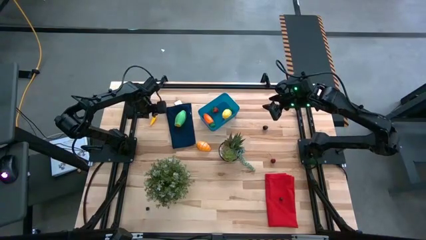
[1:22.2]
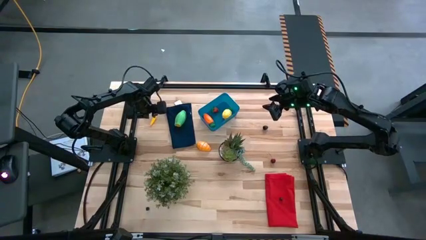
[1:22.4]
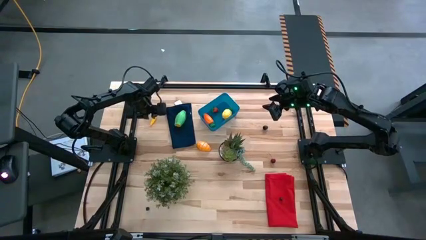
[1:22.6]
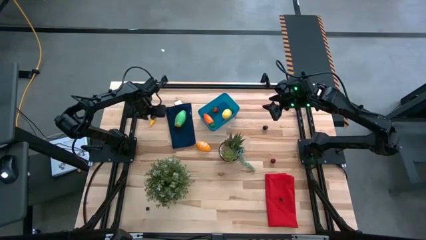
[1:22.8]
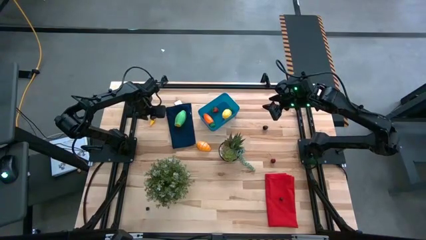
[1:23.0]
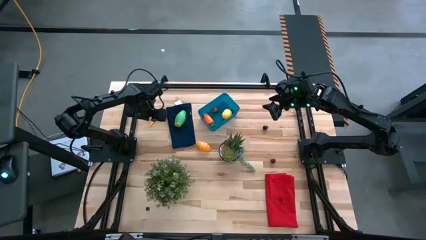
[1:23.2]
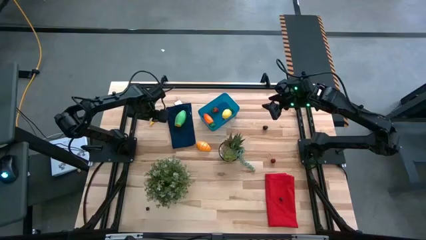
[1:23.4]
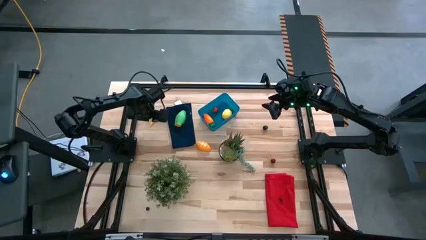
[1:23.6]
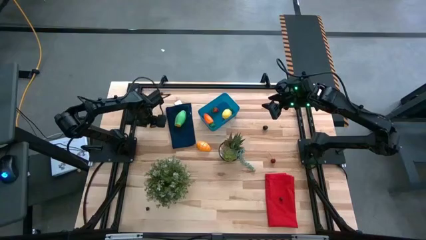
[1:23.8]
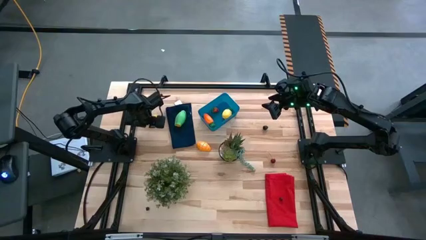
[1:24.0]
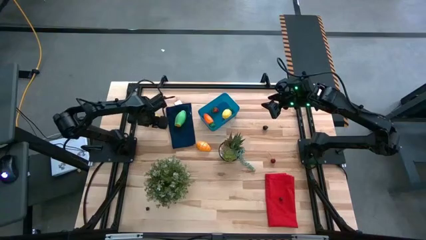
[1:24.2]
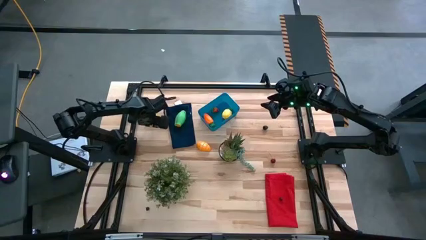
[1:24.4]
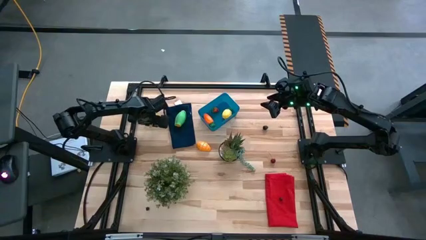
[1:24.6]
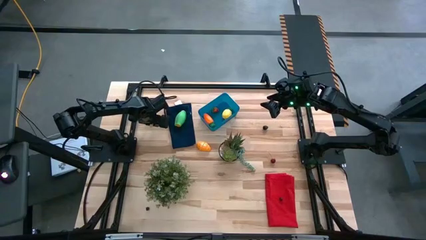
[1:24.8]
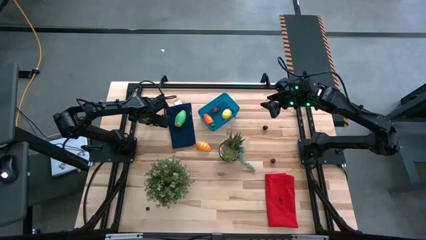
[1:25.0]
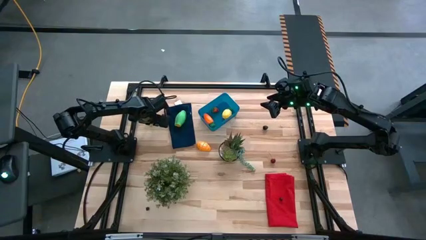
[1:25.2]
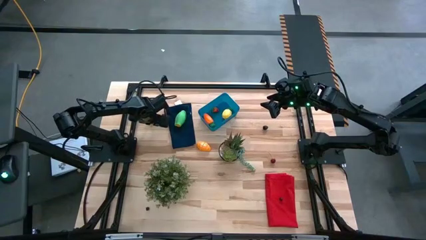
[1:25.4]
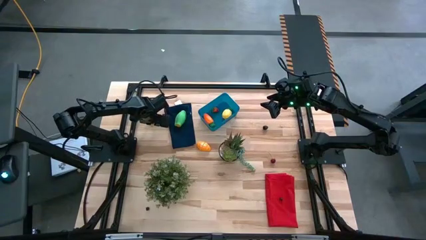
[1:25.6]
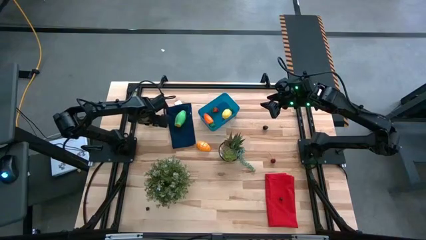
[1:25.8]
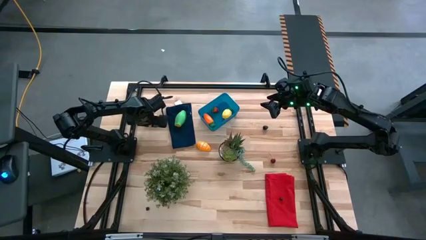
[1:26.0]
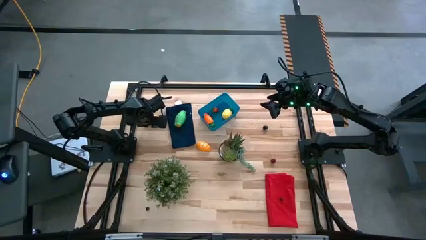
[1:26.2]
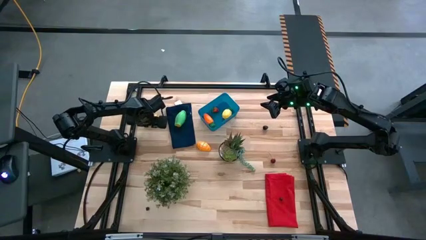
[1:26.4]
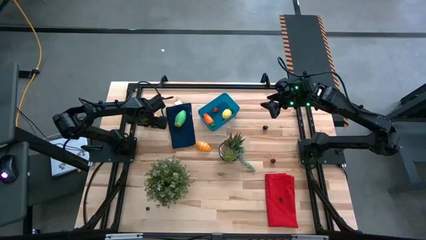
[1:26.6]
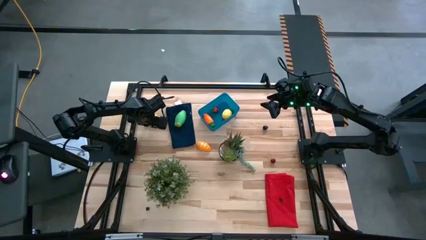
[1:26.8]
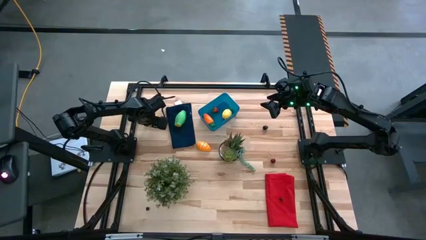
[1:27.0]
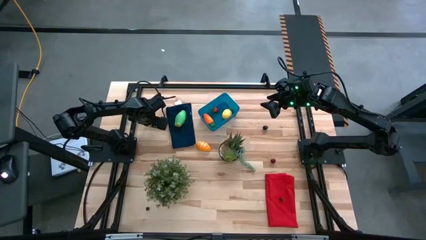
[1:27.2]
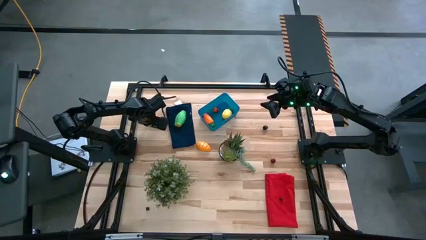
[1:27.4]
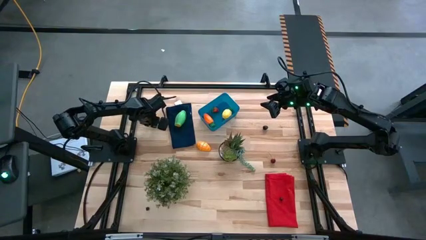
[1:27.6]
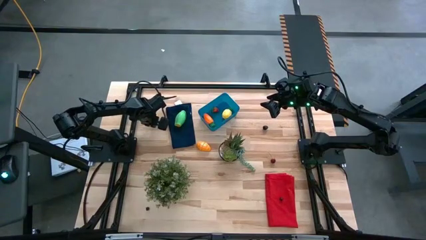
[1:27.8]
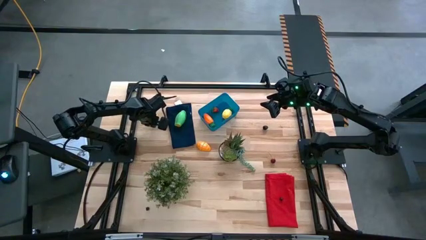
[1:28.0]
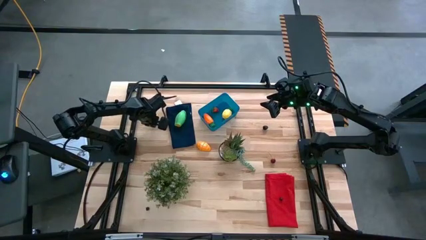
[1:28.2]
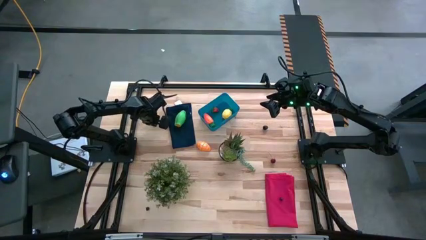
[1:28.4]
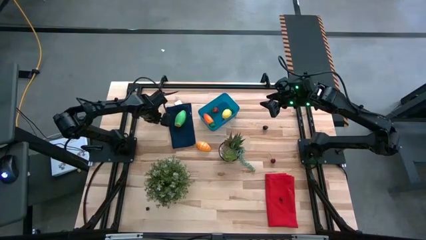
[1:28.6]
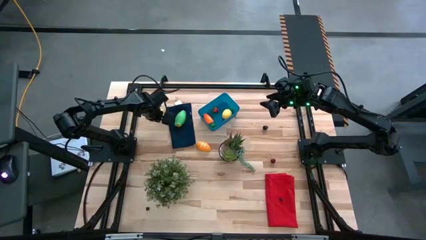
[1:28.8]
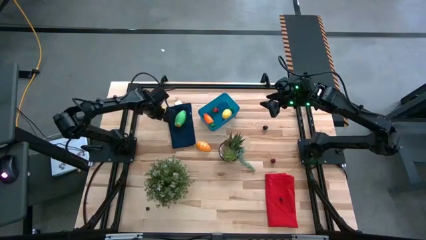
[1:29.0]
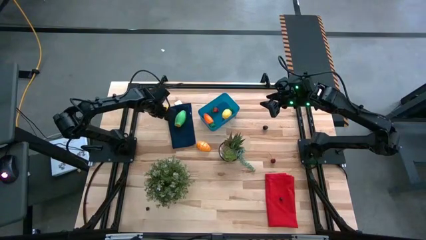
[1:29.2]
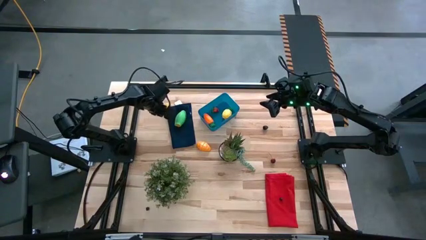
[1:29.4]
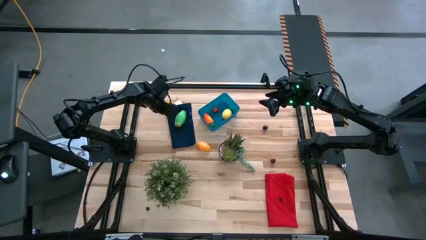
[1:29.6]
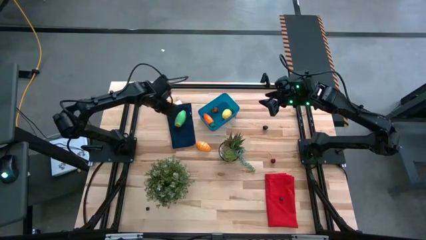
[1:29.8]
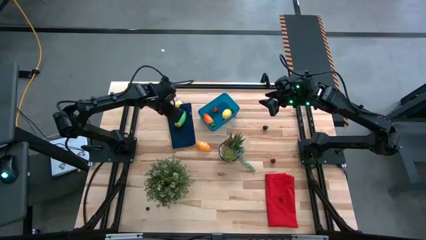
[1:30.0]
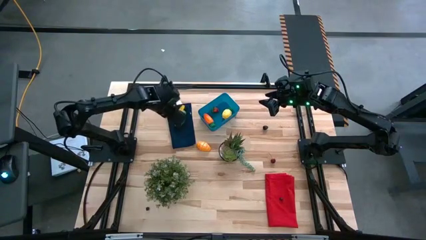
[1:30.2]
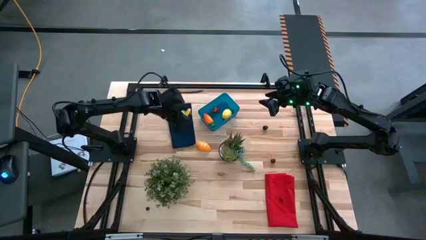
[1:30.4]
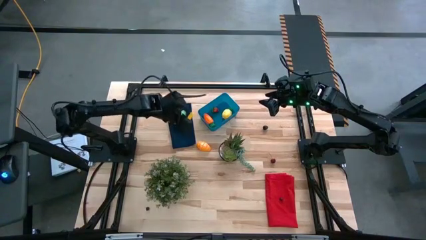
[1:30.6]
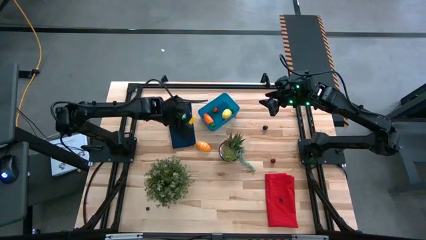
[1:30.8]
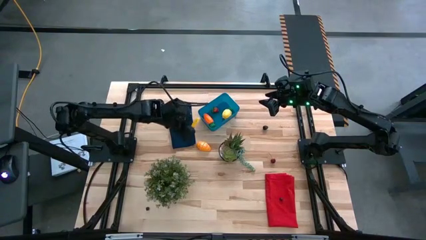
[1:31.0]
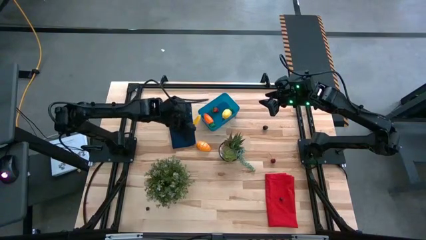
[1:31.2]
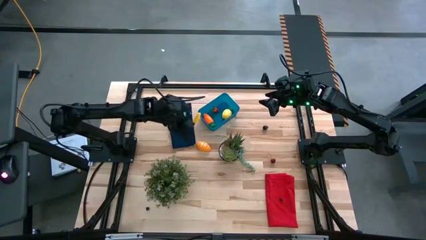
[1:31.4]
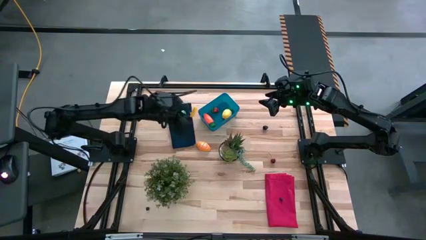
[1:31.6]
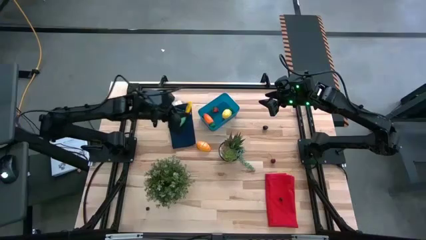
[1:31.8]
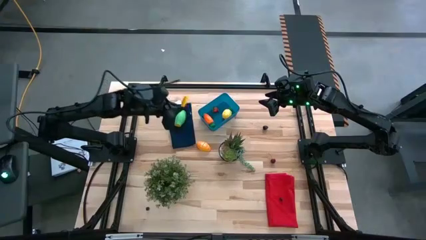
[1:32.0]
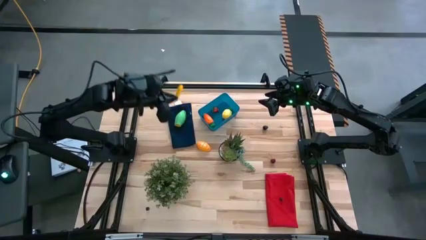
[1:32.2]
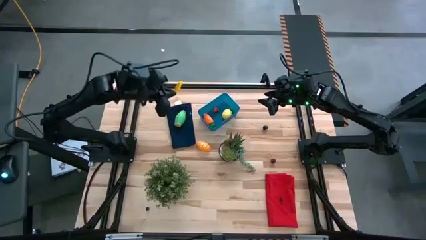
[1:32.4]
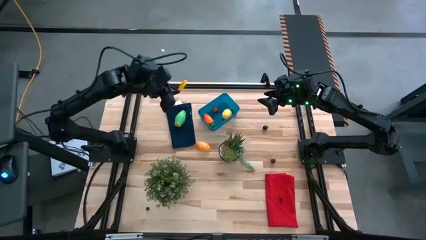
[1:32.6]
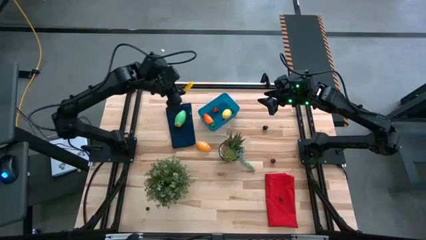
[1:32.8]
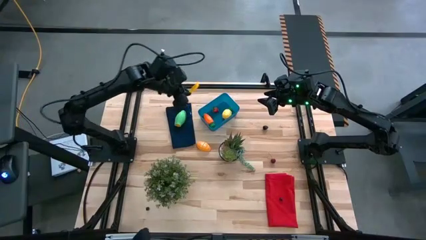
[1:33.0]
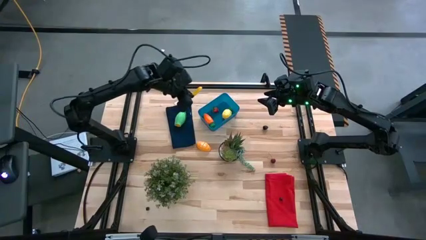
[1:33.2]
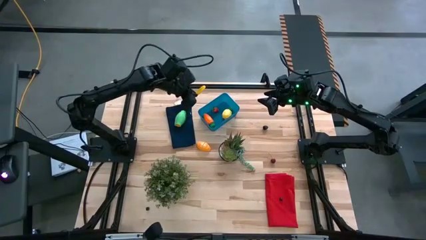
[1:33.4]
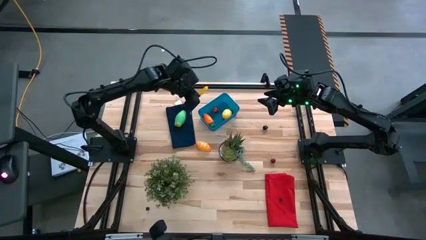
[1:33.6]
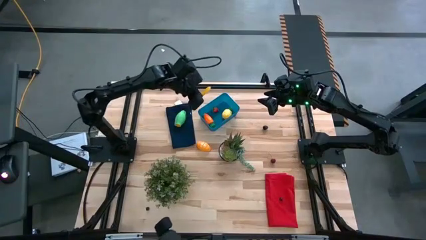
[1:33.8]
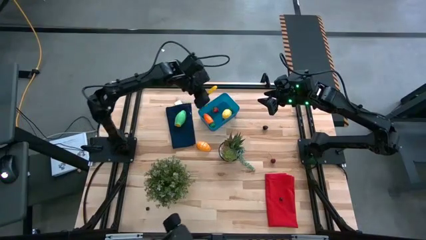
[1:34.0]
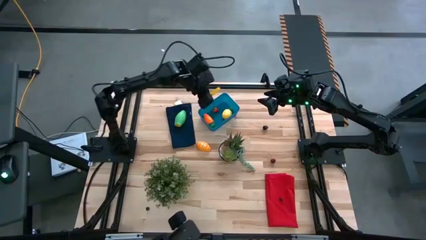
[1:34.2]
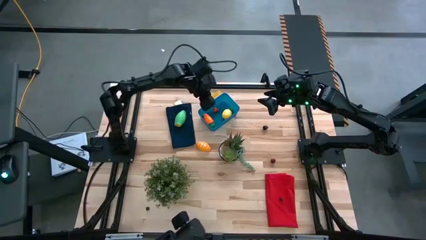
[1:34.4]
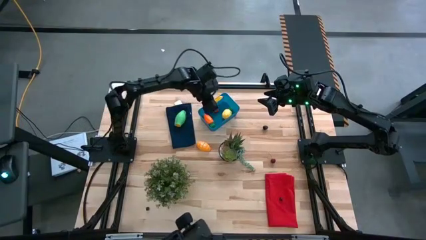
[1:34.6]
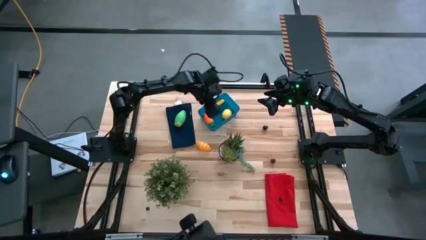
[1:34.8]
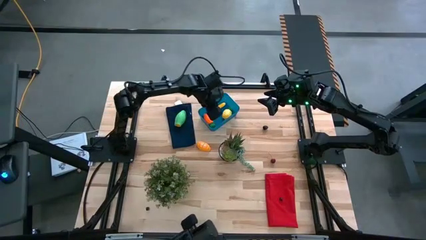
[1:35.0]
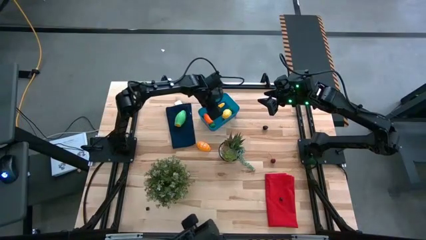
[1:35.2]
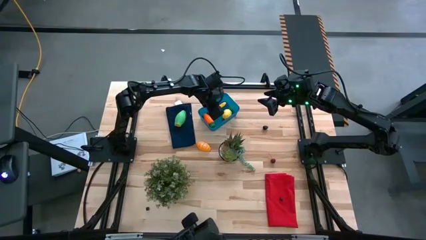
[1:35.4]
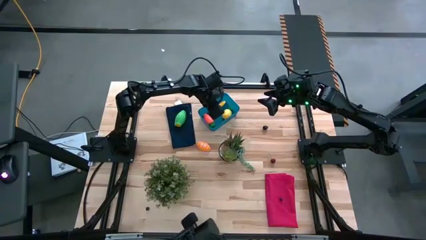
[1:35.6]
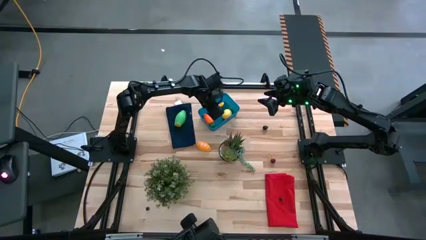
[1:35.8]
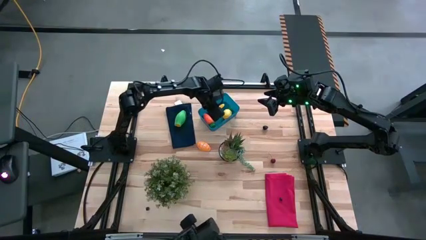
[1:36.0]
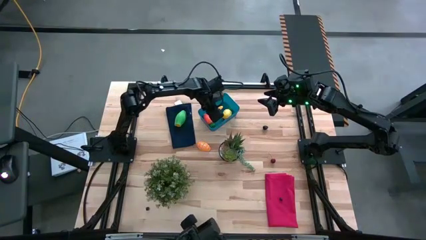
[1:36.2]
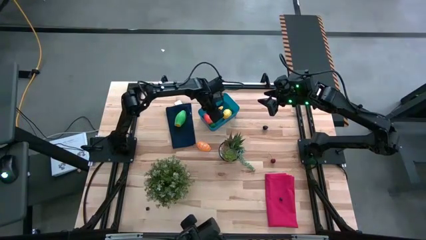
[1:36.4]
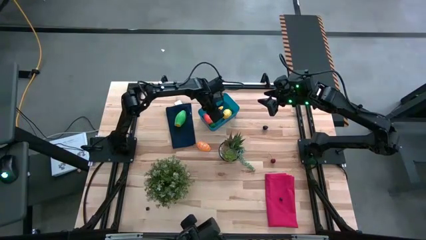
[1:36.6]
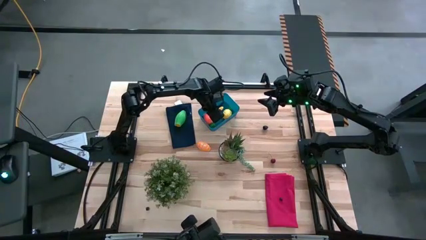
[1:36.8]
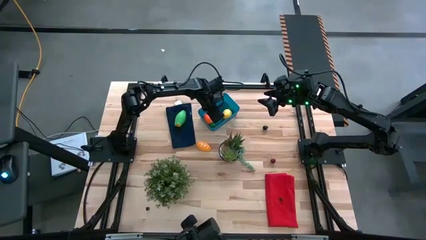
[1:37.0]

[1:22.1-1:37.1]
Task: Pick and placing Produce into tupperware
Put the yellow corn into the blue bin
